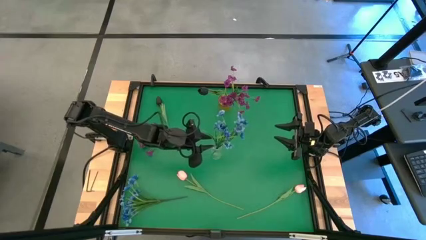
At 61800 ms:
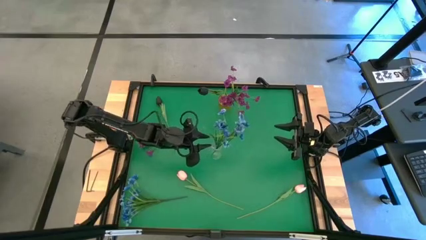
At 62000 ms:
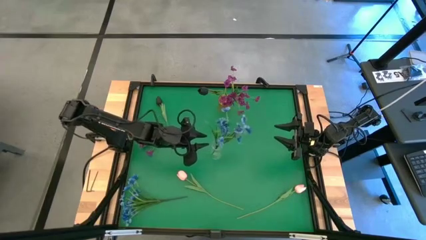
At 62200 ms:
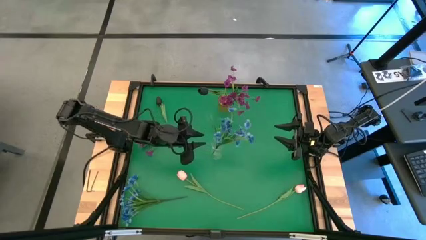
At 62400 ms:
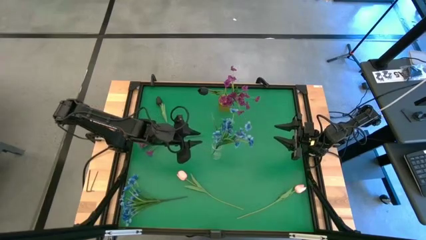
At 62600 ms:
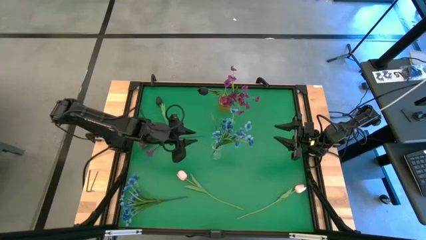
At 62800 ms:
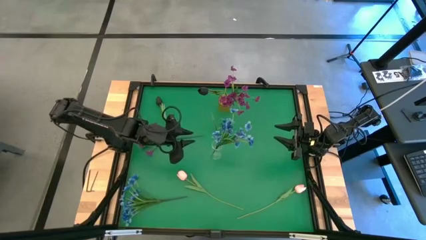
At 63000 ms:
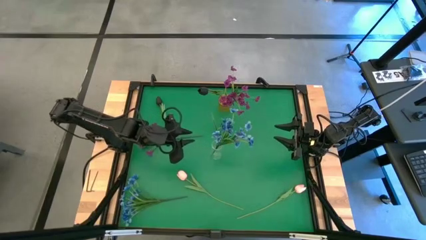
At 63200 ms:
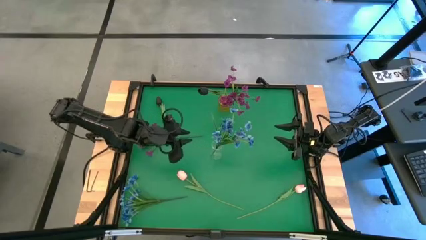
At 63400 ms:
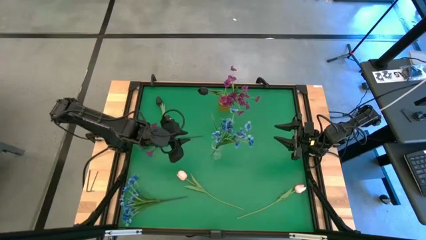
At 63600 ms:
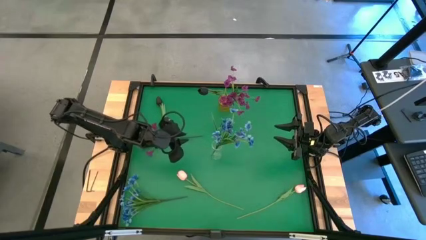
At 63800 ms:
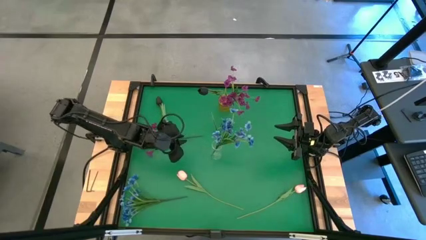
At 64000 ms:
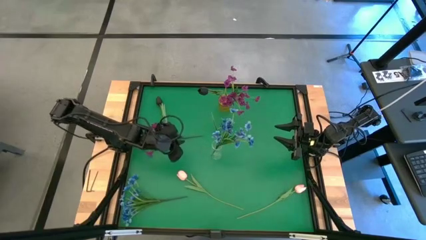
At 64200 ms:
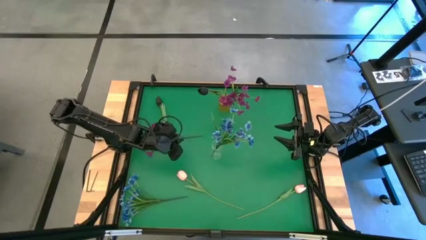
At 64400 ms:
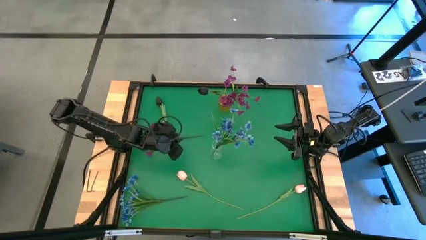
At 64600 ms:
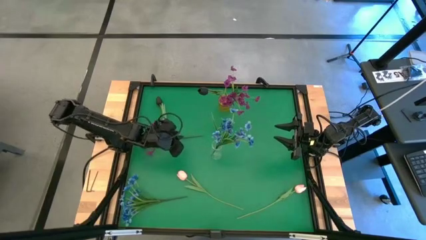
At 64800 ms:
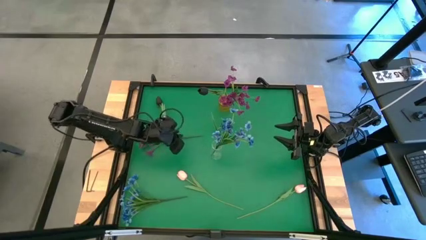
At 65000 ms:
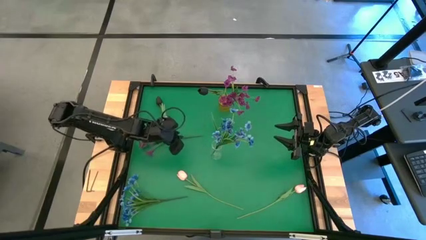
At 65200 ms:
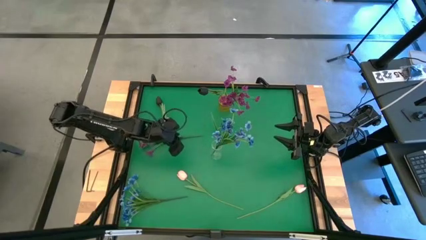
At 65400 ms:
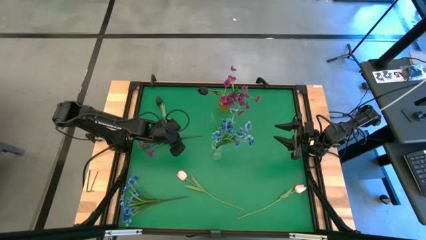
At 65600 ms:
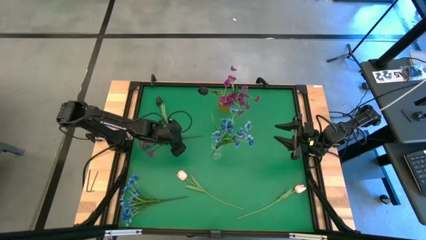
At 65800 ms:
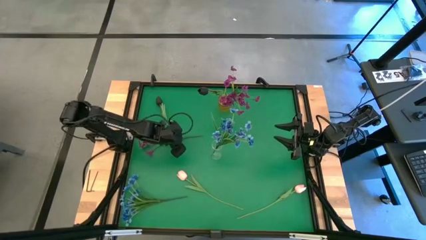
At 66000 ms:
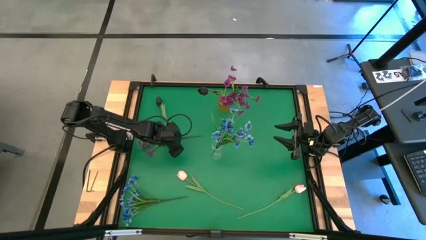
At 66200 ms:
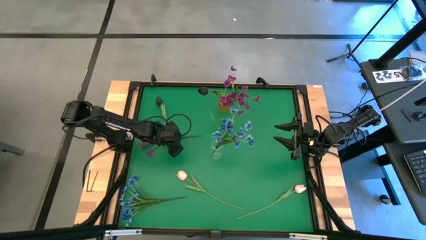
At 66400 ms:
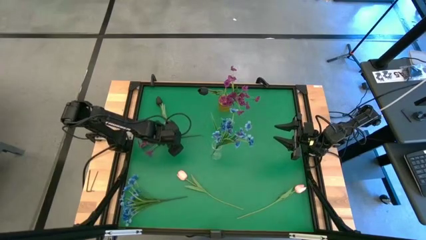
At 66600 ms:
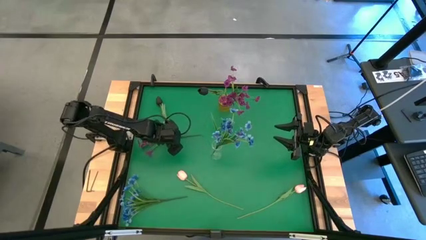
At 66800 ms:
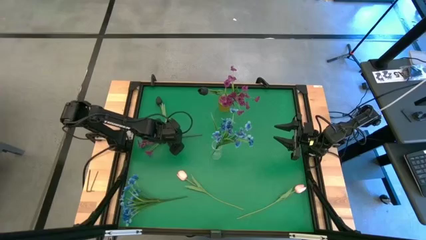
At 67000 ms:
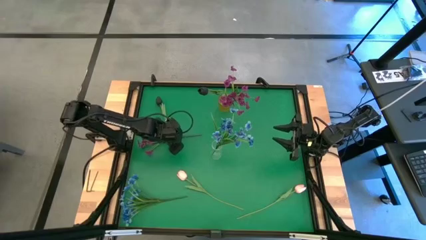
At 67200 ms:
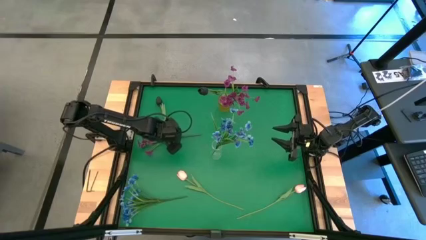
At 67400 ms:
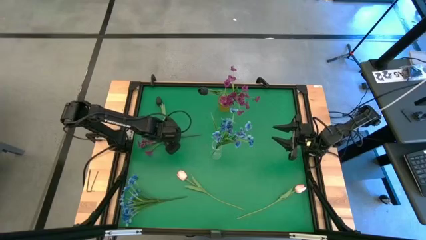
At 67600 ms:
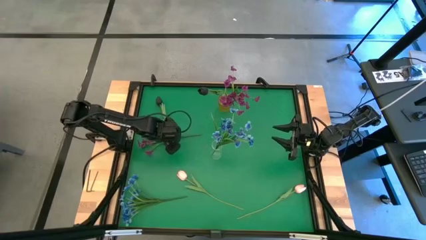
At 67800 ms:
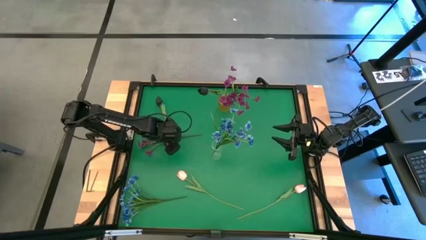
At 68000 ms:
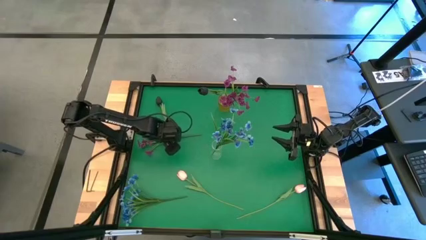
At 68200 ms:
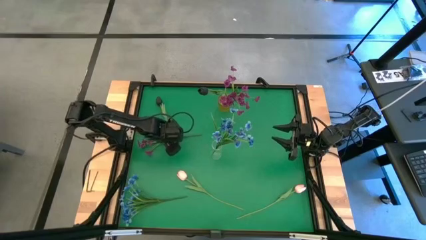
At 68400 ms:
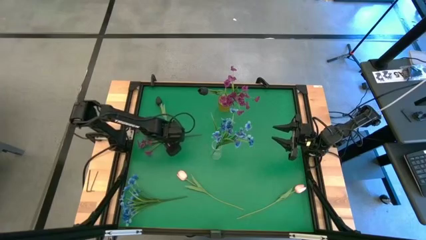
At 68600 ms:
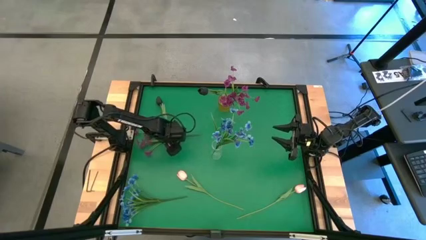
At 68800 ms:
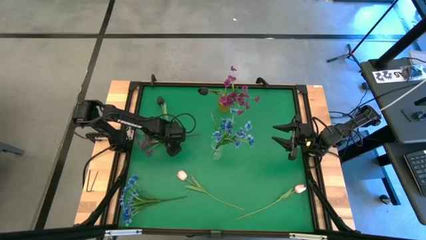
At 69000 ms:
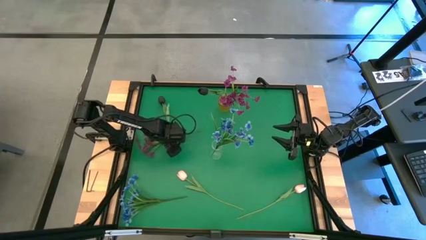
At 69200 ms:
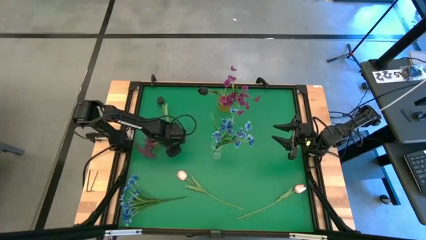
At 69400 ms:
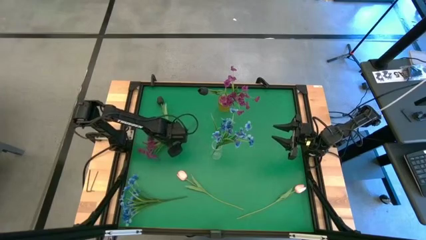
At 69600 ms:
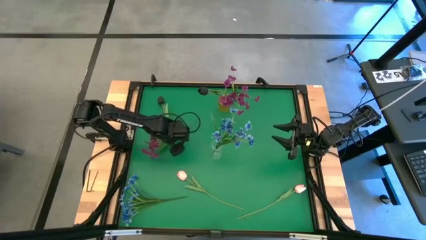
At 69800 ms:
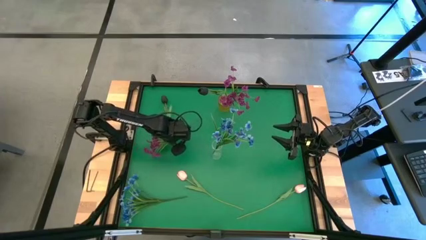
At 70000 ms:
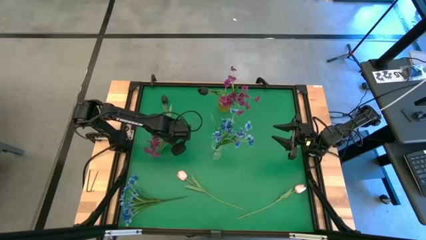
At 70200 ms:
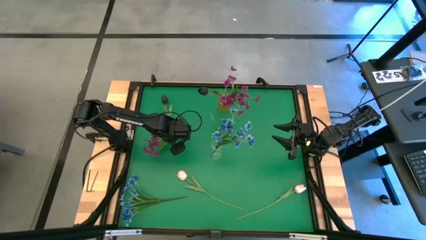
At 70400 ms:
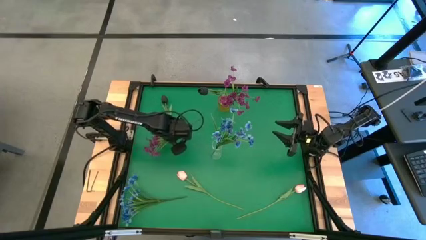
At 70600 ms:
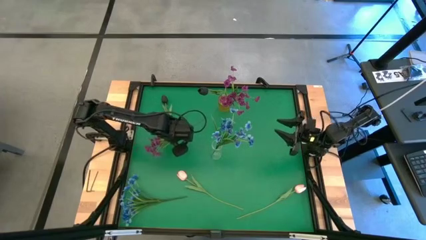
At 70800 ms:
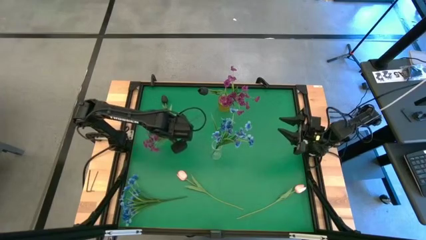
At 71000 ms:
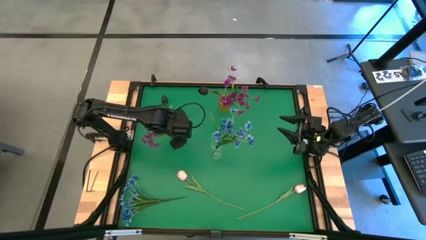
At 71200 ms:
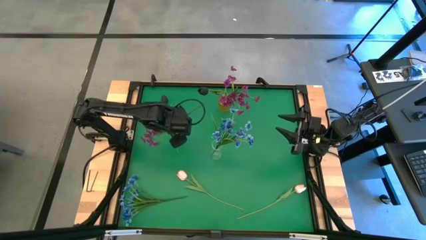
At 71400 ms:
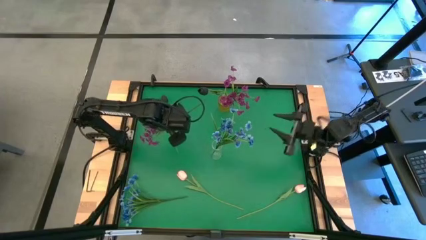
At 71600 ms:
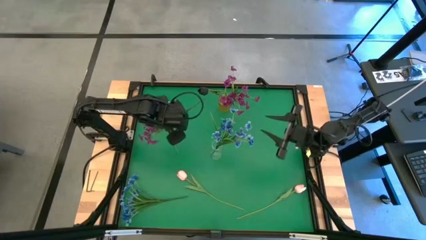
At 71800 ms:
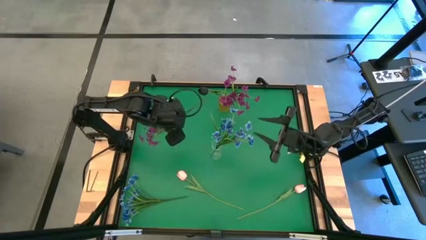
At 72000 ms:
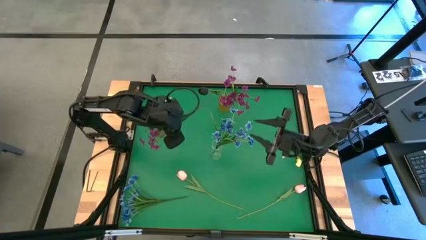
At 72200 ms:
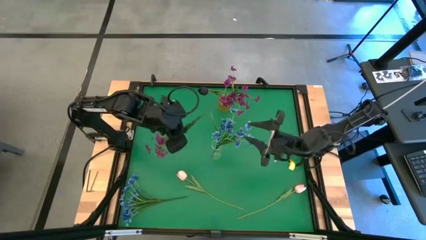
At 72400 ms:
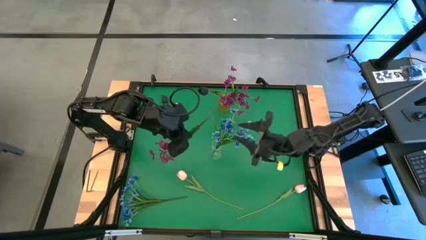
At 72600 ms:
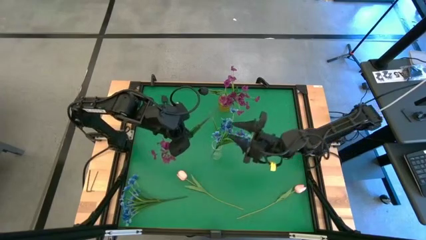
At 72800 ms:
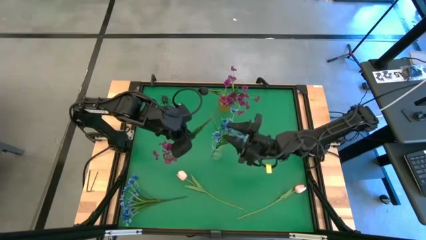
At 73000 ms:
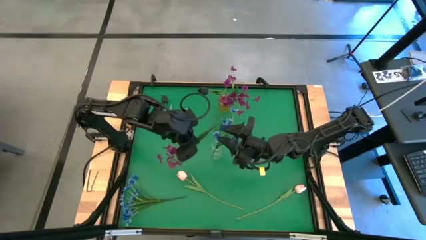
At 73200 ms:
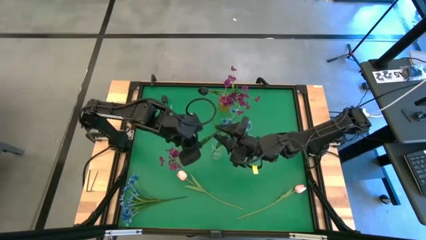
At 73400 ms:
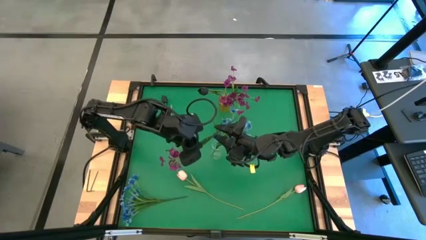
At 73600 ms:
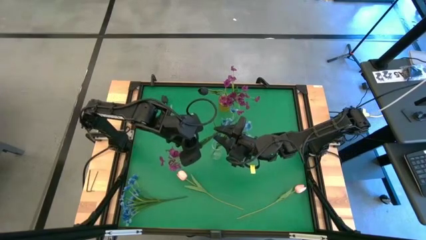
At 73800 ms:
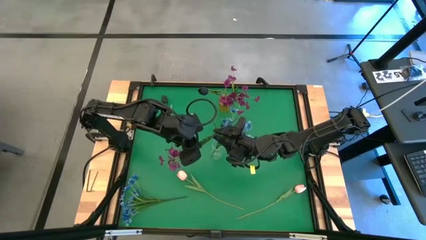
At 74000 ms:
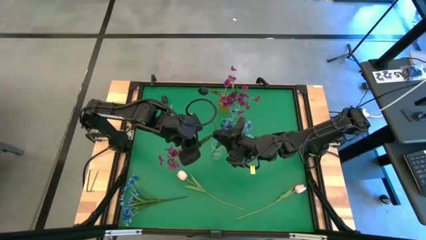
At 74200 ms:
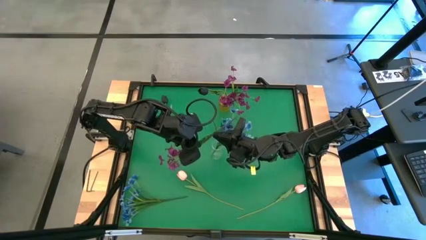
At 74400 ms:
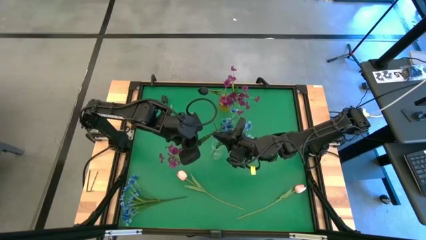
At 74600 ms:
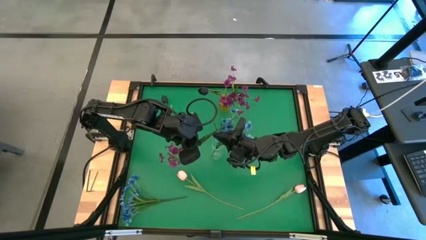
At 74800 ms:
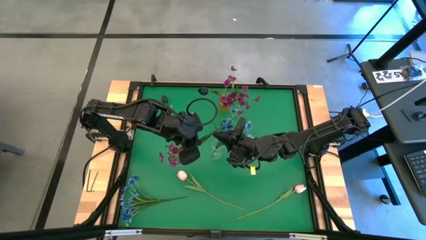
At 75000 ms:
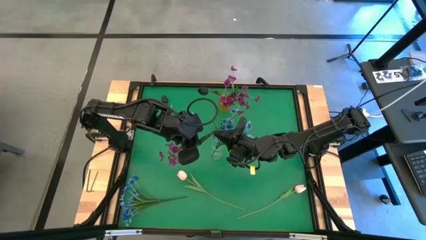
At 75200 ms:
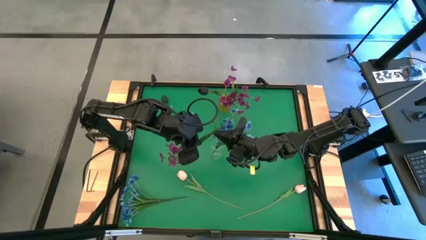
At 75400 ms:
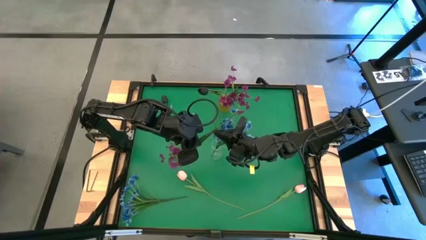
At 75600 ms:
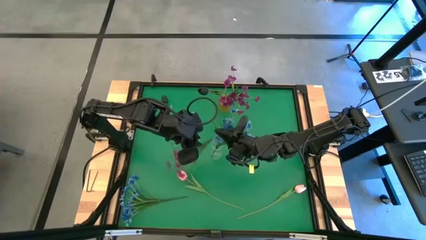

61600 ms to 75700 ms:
Task: Sort flowers into vase by color
Put the purple flowers into the yellow vase

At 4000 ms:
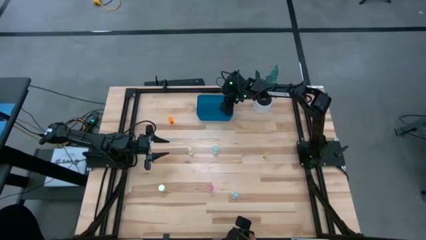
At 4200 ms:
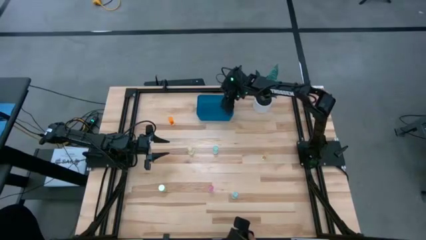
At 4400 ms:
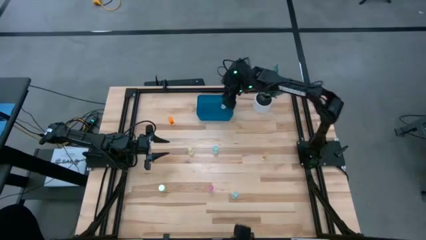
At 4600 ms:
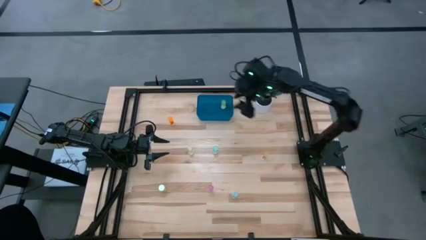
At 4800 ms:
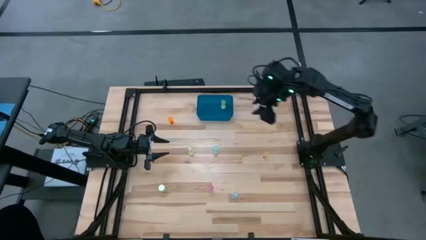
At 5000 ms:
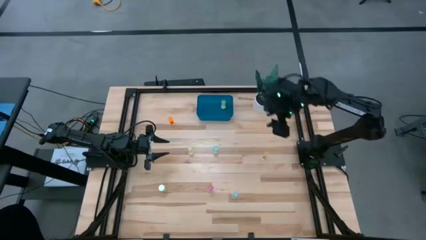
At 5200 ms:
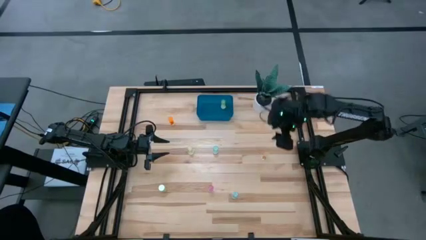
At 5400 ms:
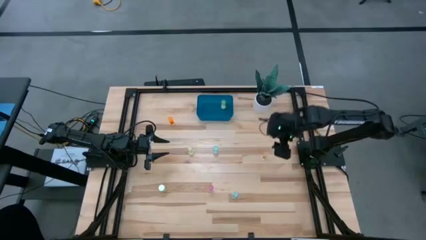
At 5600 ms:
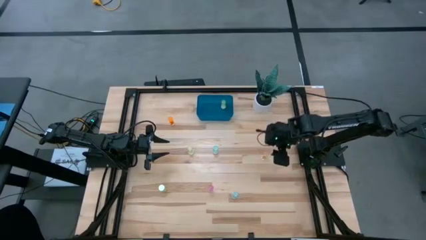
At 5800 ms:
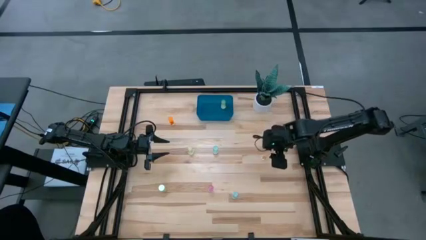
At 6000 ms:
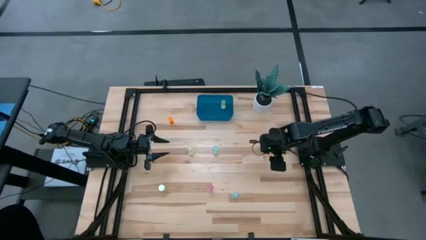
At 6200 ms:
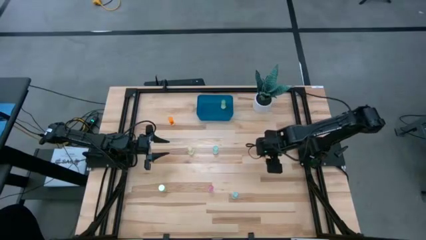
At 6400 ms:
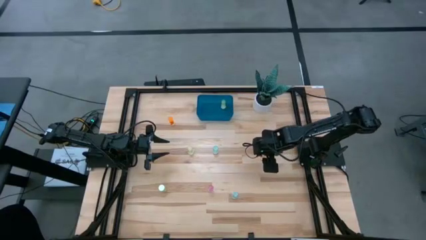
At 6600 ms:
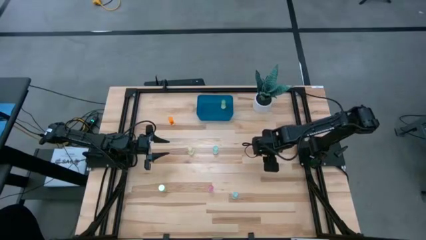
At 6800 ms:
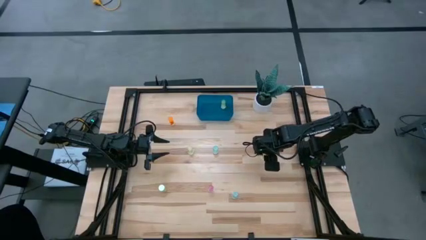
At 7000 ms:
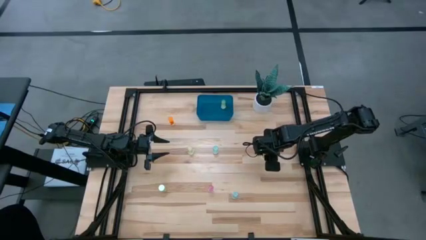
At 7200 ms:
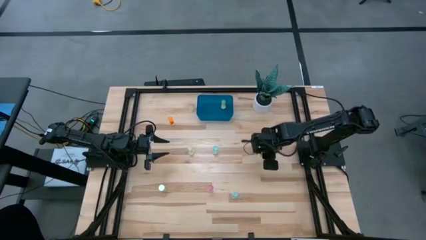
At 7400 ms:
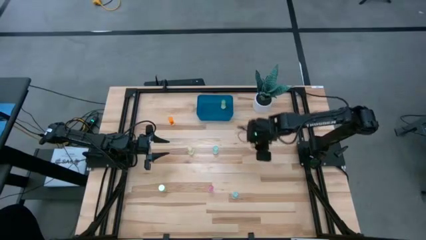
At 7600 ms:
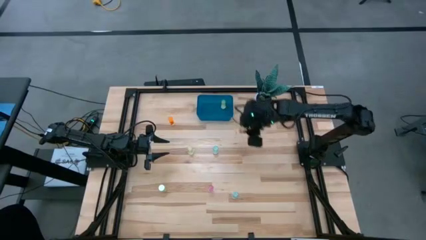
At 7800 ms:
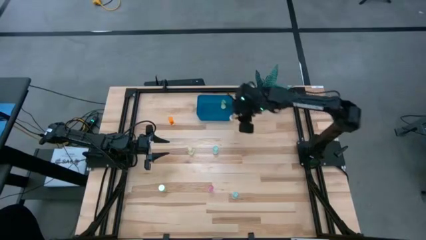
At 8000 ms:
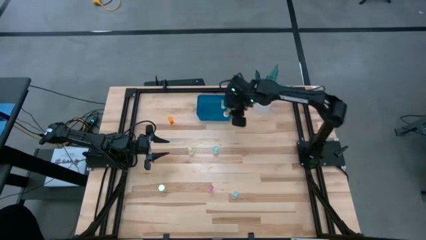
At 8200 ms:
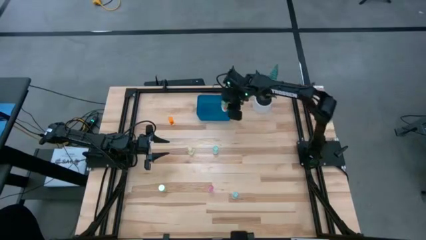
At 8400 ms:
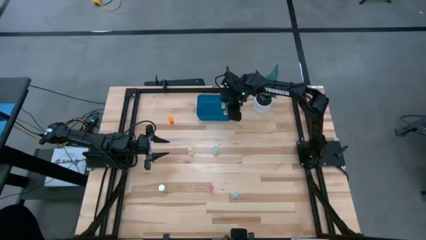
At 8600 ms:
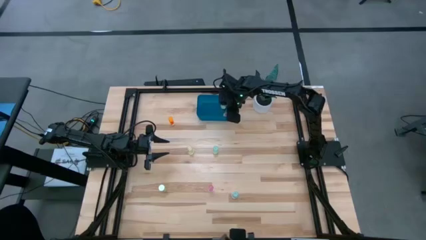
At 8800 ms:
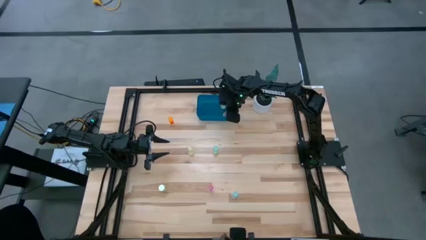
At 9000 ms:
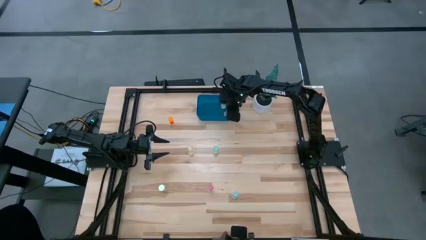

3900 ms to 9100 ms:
Task: Pick and place pill bottles into a basket
Put the yellow pill bottle into the blue bin
